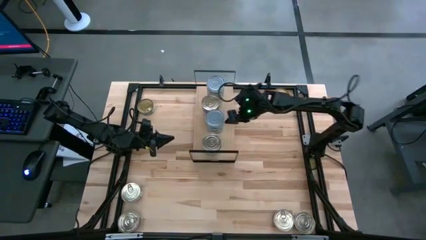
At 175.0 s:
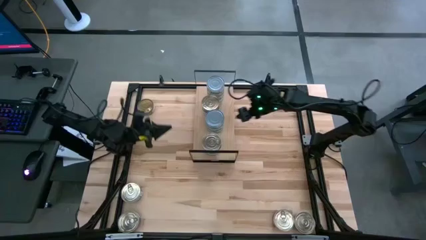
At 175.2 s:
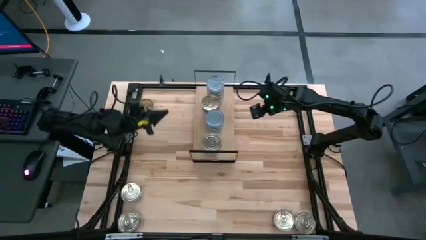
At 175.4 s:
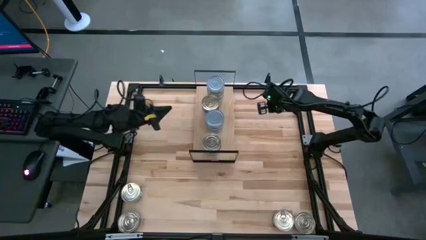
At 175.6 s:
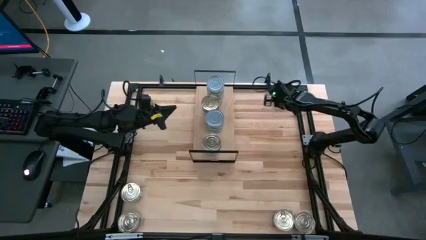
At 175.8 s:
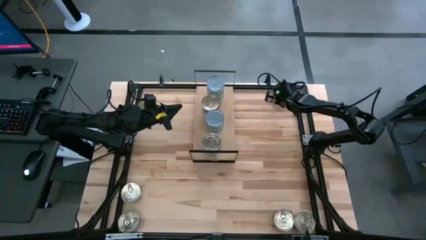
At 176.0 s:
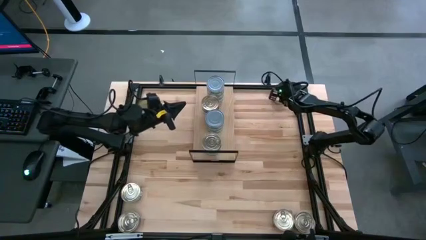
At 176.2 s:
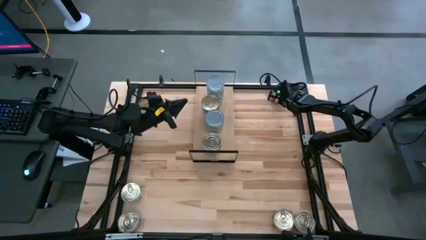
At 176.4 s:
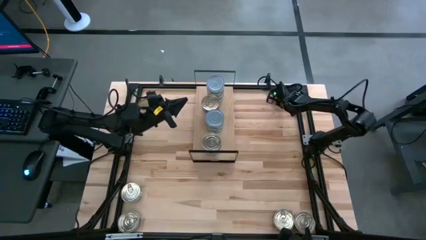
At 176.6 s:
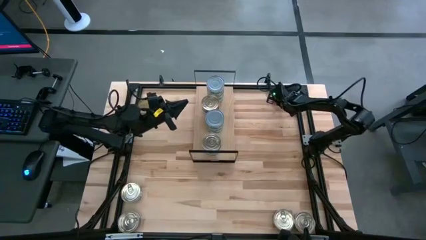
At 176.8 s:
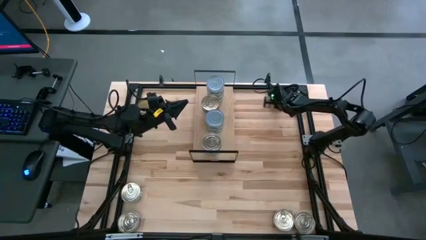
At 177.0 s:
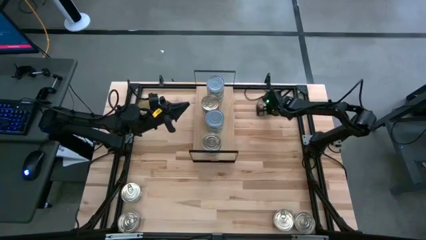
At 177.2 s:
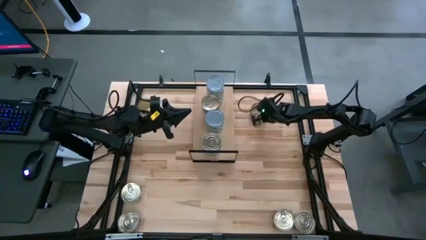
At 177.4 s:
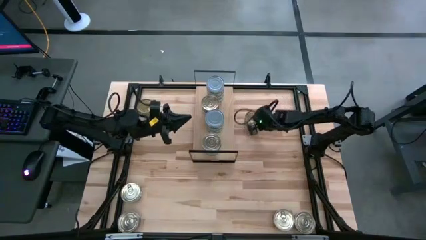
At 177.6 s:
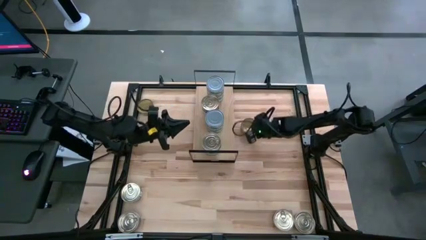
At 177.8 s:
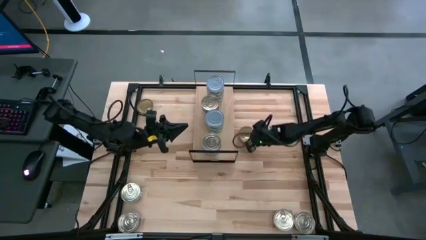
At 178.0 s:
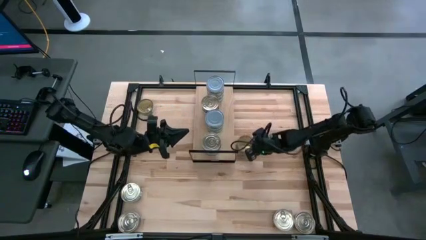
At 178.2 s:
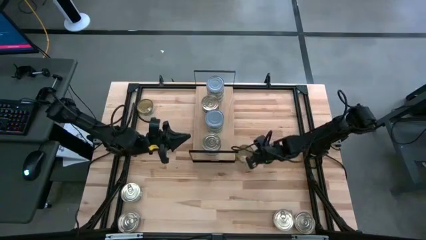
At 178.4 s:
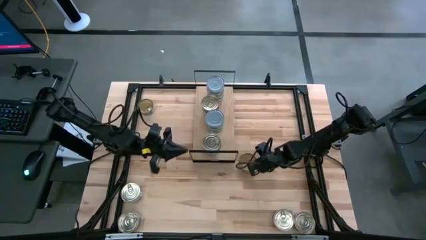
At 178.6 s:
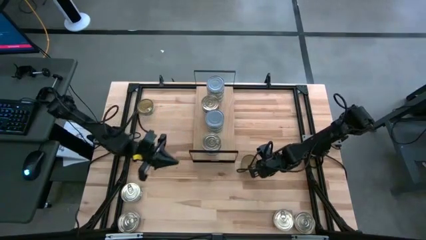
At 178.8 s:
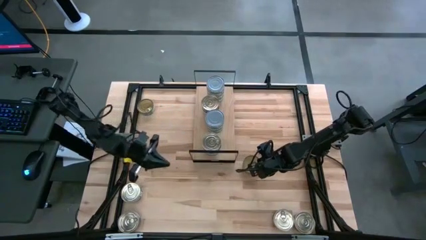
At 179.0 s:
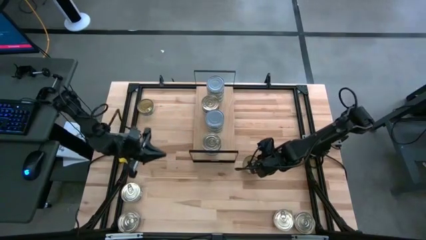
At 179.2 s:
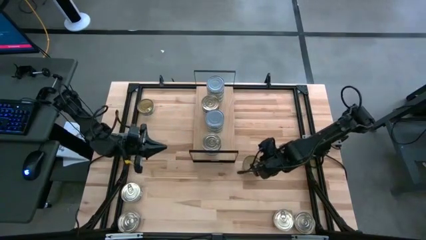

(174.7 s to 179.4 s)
Task: Stack canned seafood by type on shelf
Move the green tuna can to the middle right of the table

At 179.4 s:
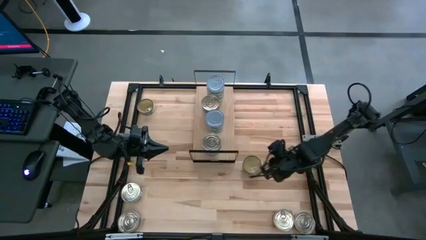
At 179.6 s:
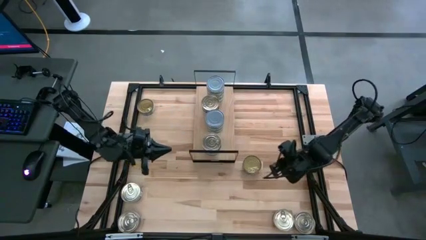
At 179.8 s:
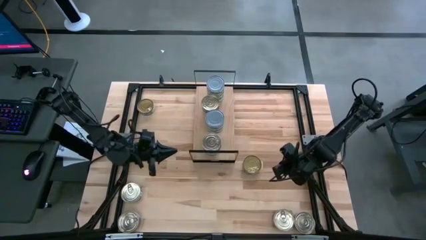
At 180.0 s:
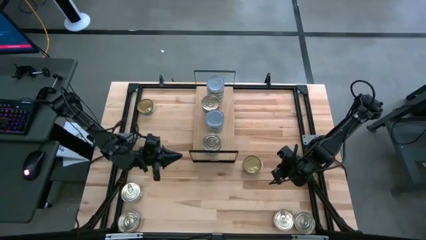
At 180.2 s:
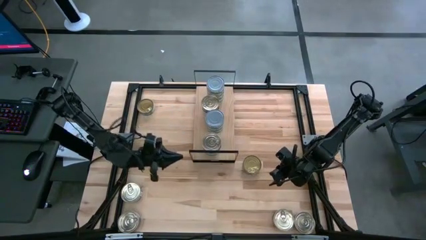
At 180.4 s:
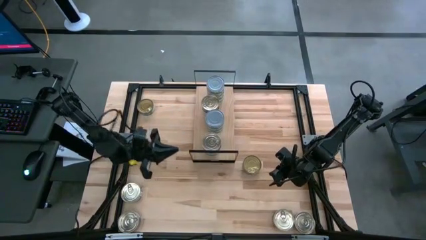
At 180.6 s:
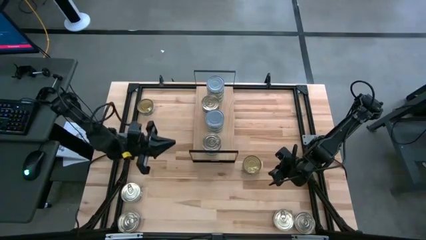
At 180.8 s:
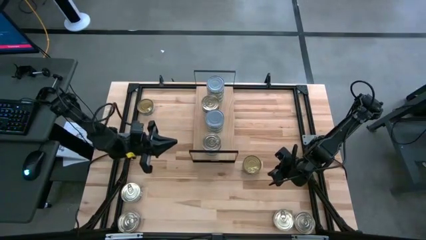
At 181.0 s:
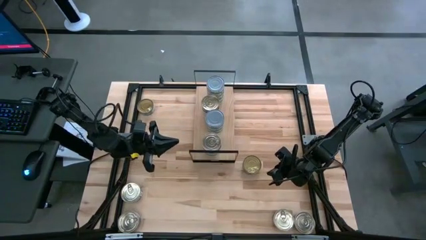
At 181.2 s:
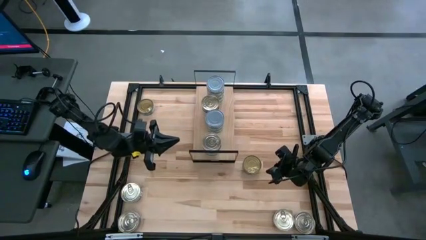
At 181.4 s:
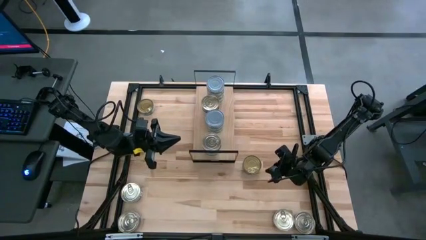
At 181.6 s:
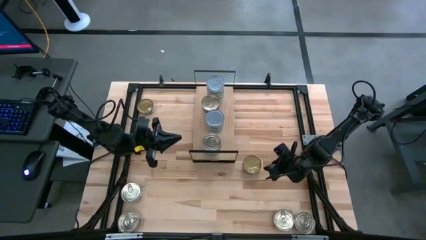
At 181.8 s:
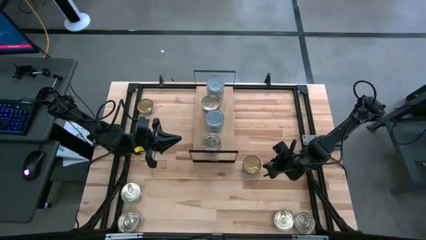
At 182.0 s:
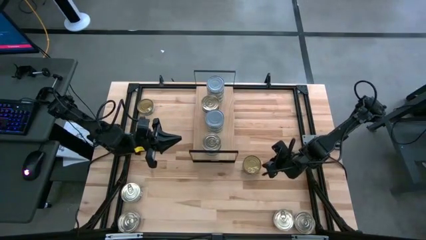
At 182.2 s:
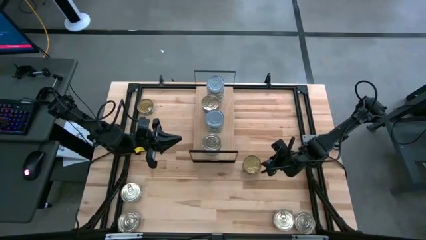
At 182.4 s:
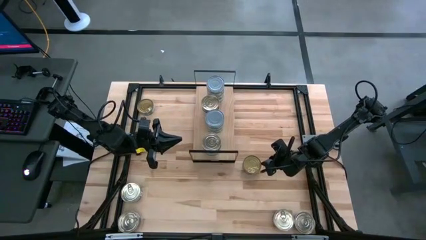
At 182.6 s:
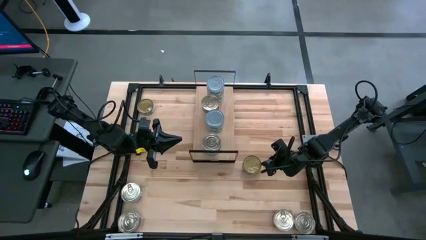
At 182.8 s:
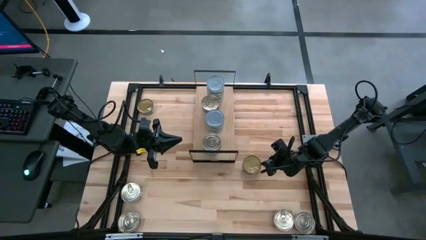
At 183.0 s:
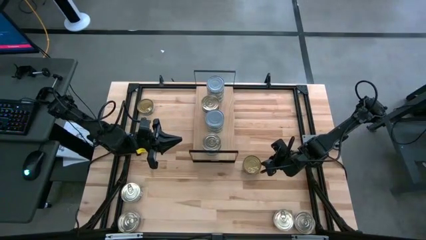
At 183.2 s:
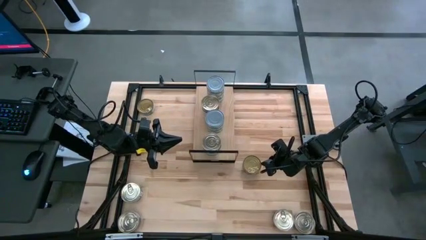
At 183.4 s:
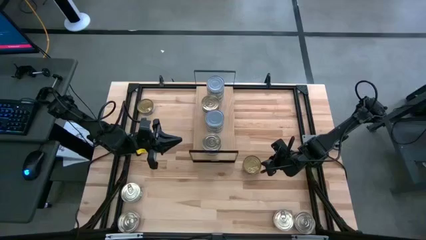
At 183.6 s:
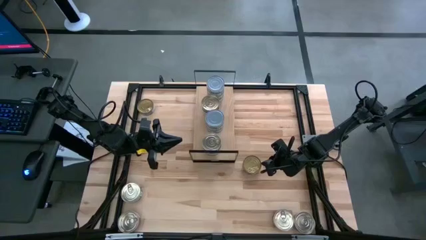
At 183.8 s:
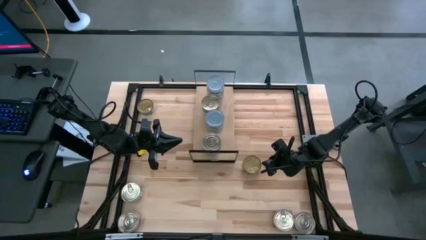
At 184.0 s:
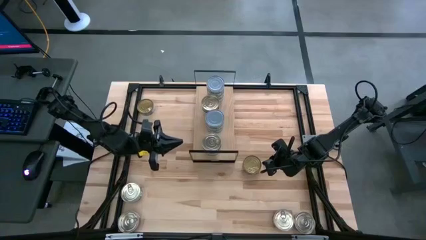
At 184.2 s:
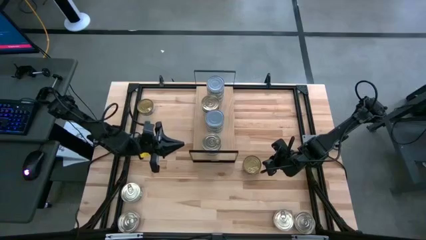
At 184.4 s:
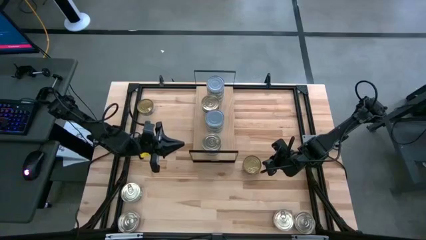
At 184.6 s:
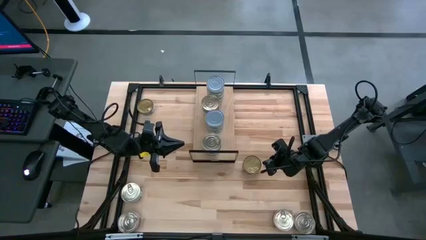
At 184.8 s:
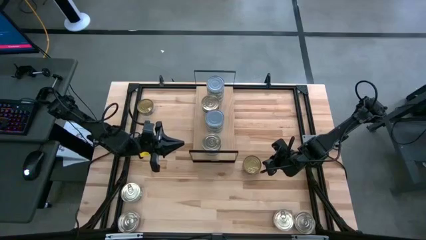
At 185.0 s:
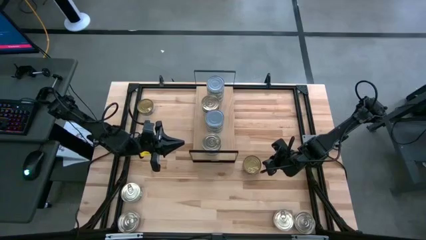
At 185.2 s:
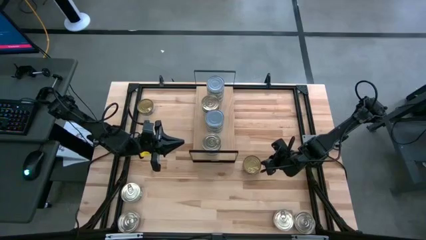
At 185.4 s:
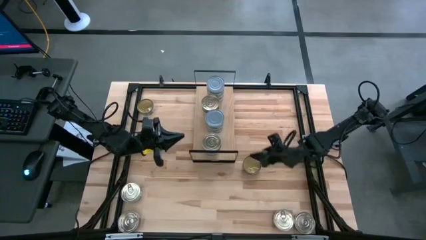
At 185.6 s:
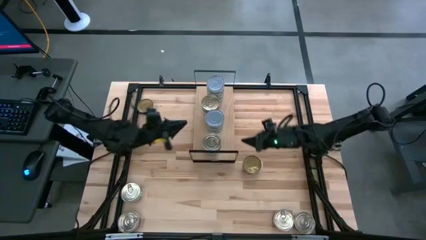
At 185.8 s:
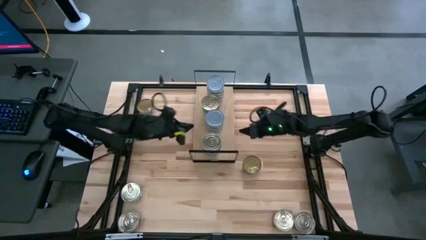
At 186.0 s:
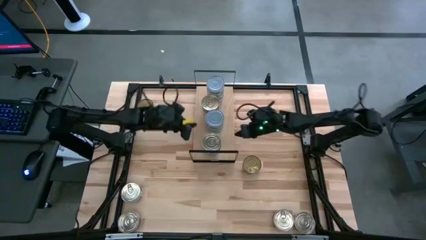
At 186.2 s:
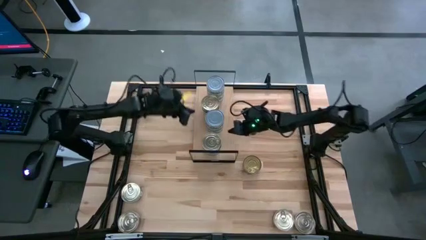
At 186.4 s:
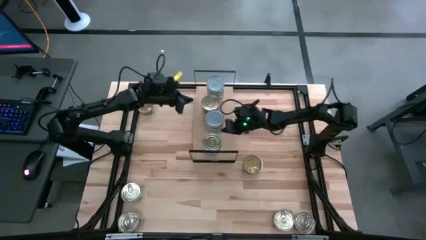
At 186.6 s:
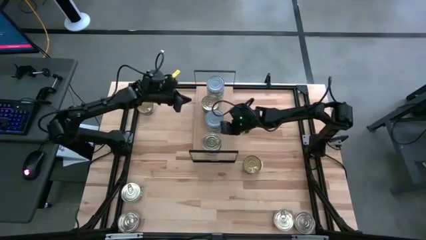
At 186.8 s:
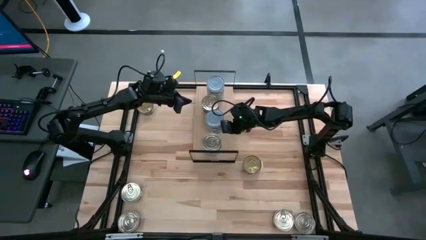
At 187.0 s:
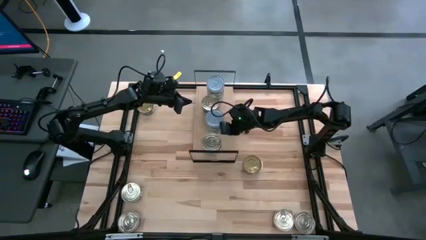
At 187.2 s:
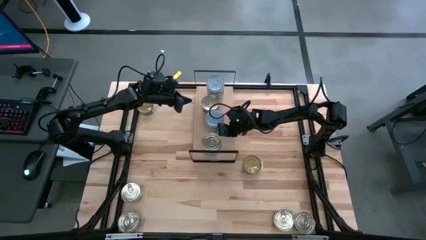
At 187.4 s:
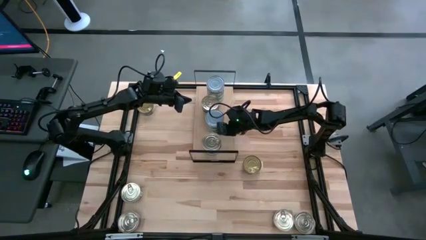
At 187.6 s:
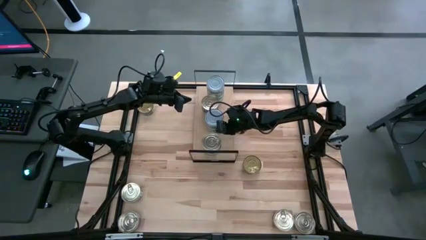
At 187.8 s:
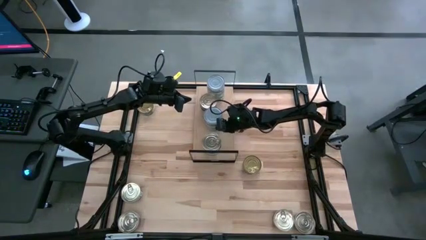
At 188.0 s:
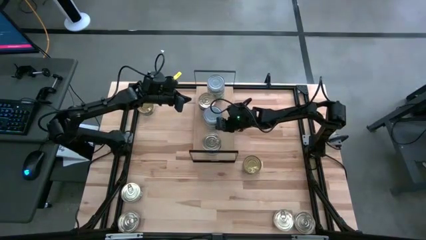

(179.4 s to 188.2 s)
Adjust the green tuna can

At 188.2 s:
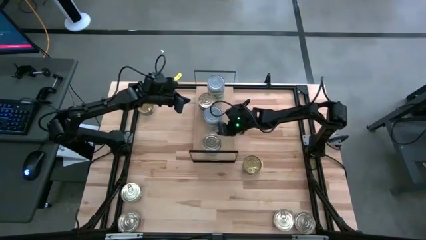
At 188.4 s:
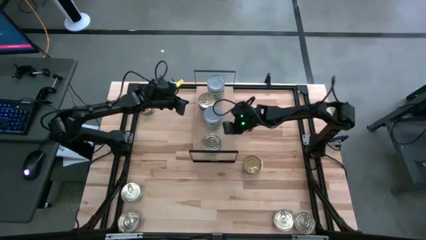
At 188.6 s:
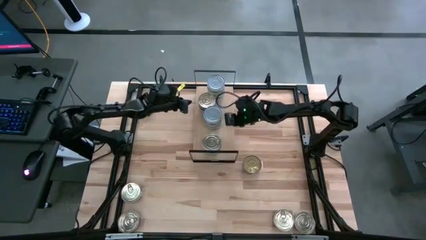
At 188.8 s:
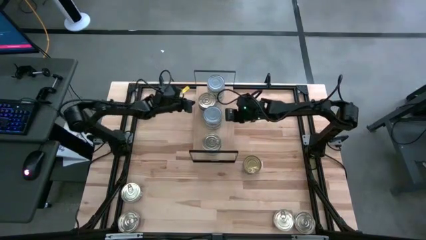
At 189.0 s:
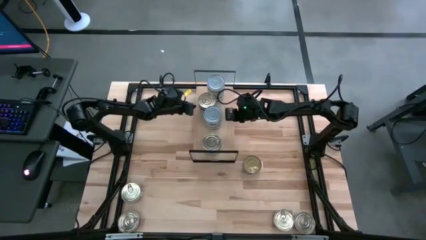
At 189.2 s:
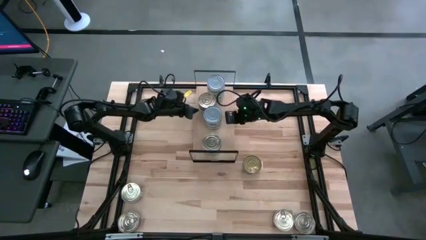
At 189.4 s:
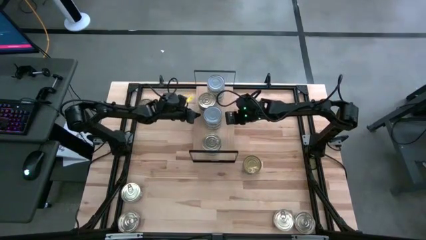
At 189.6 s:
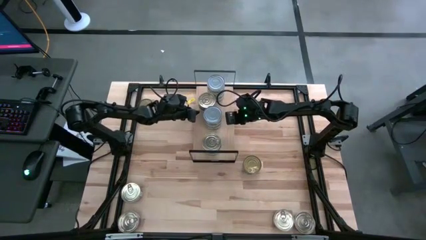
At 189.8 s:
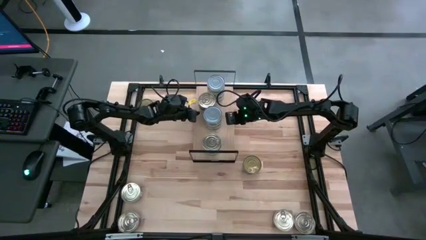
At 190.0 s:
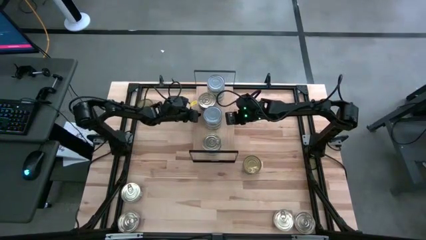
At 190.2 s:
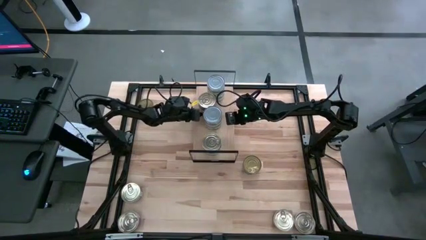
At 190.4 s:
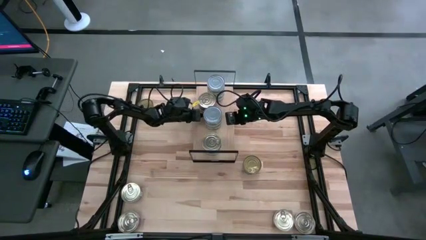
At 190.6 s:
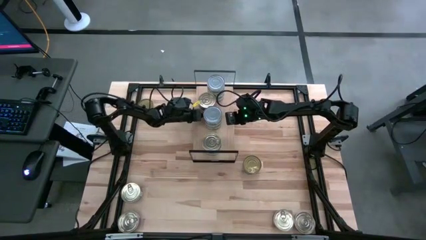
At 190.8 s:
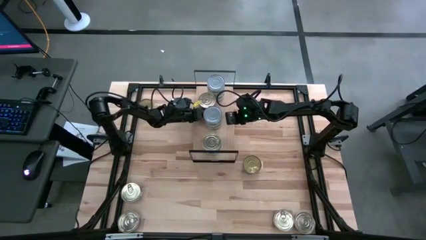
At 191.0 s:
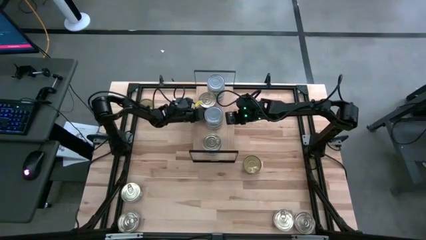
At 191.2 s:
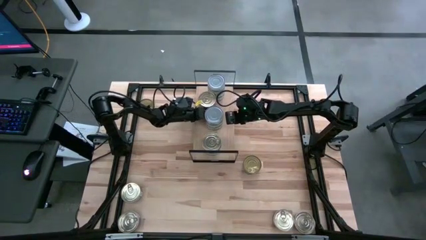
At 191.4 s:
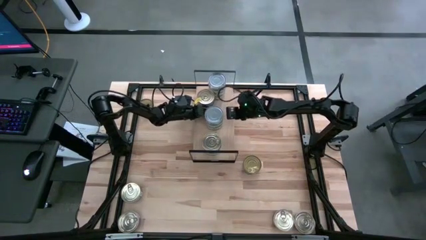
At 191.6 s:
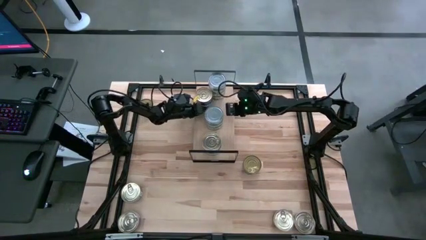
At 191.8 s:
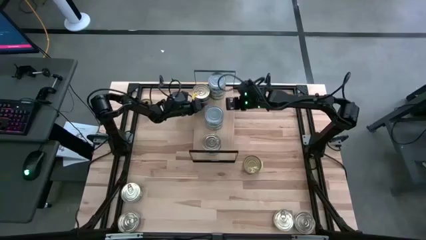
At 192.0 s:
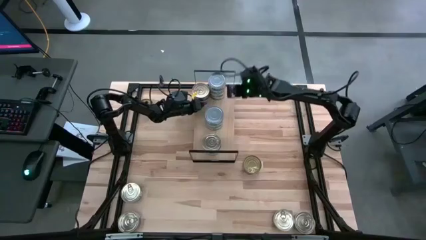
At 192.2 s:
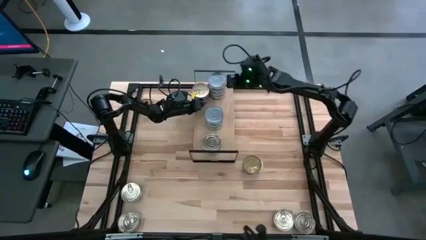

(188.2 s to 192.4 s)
Adjust the pink and blue tuna can
